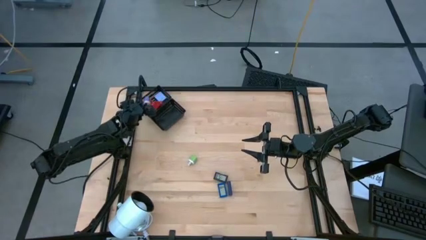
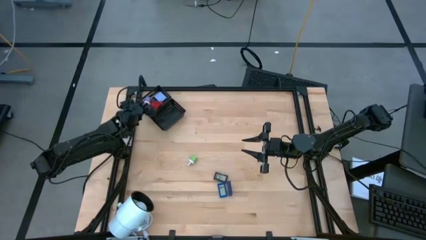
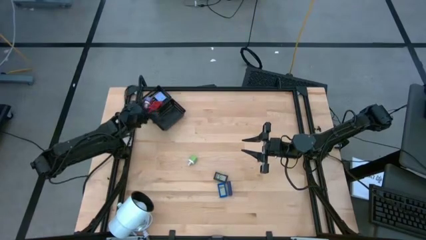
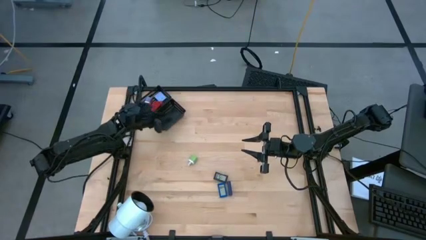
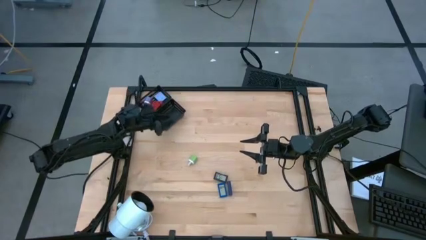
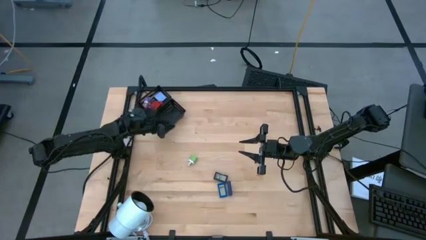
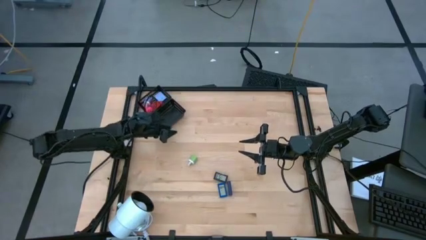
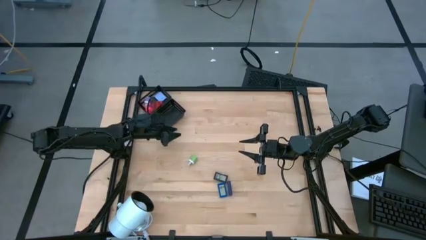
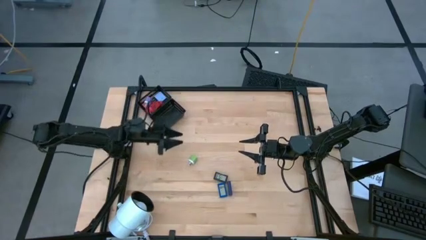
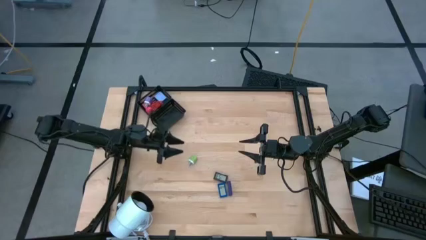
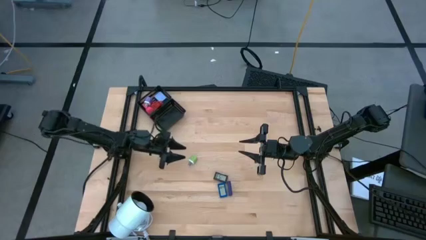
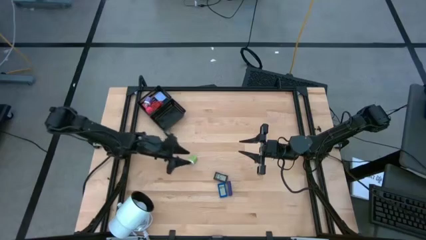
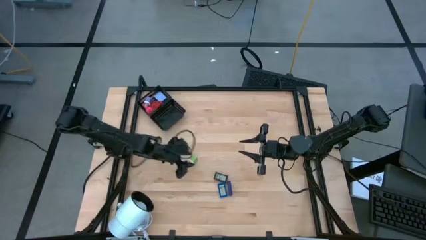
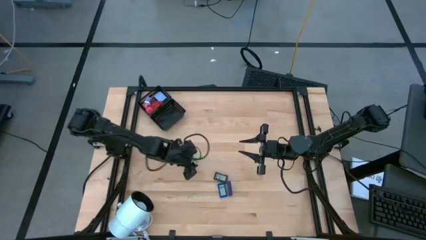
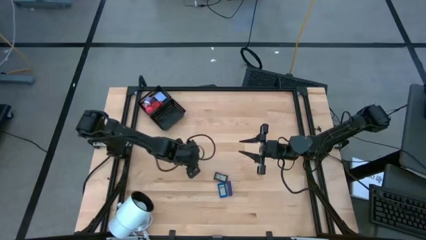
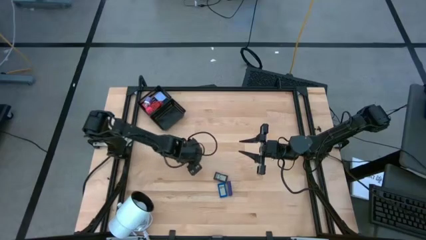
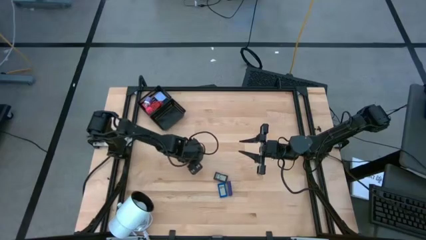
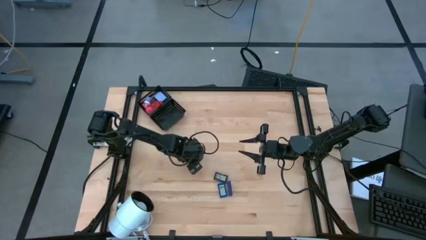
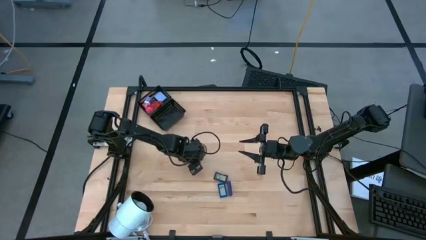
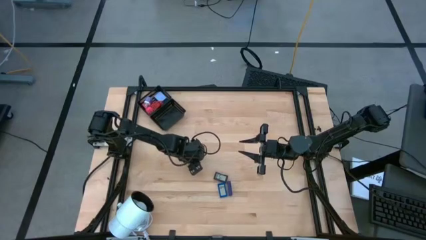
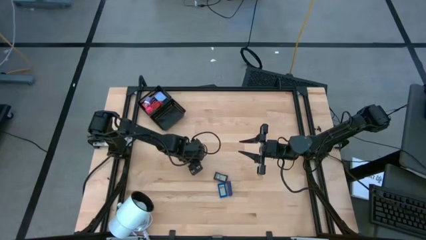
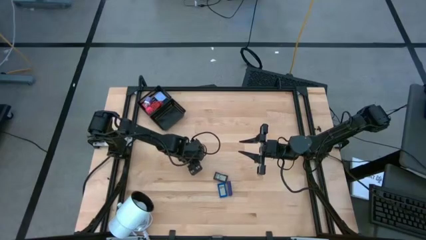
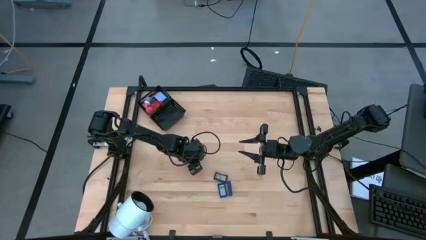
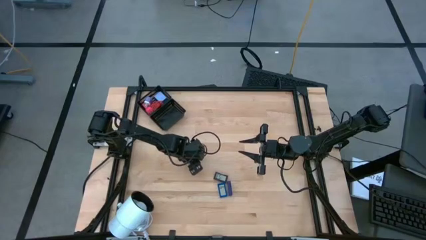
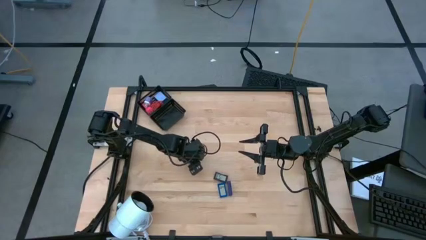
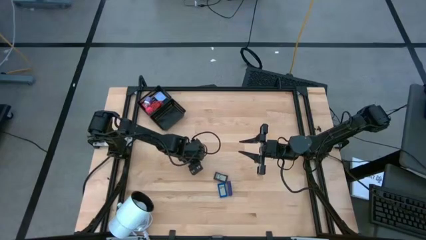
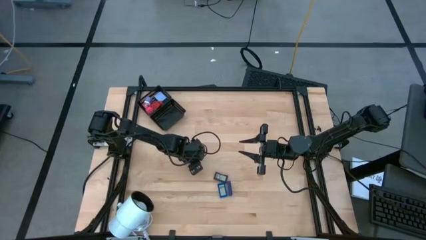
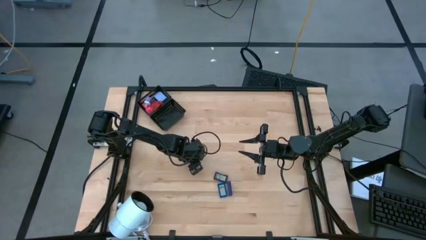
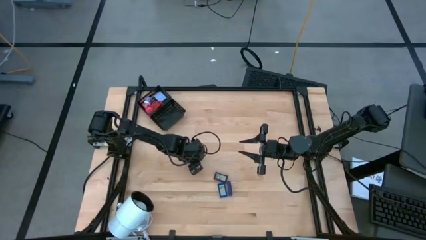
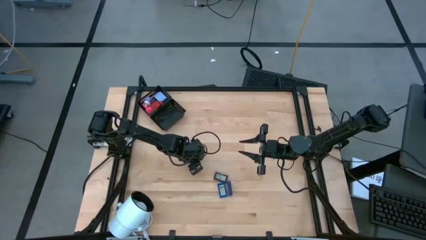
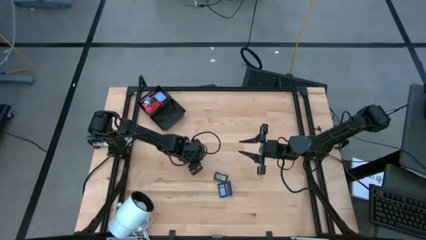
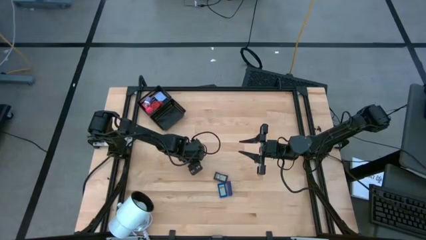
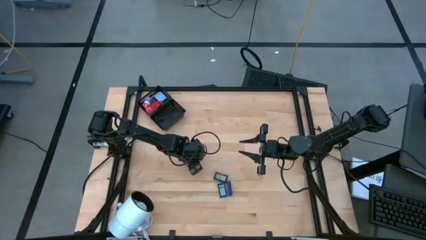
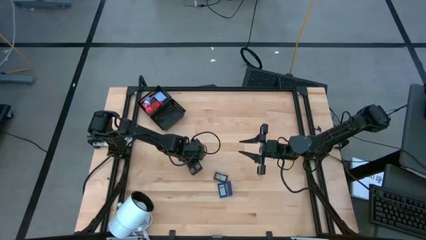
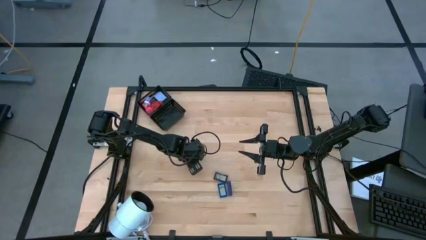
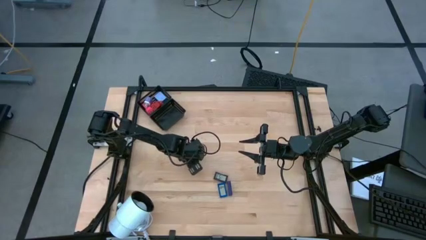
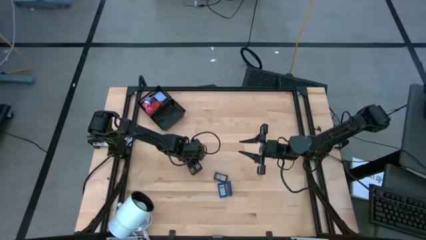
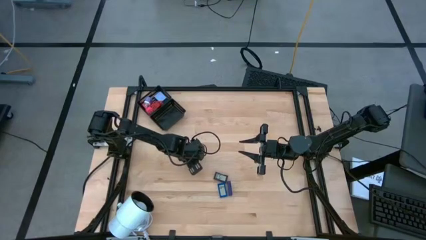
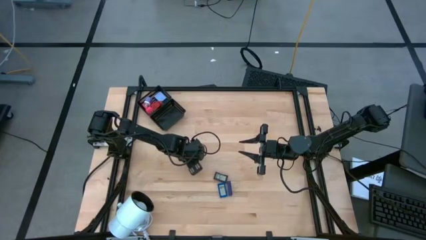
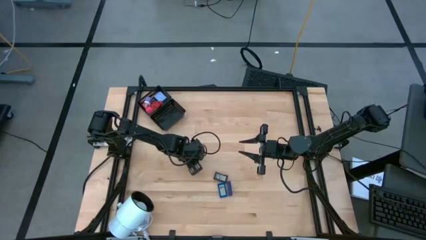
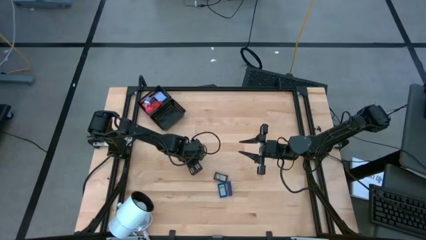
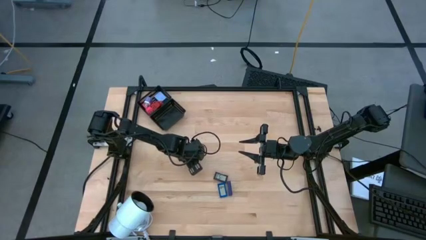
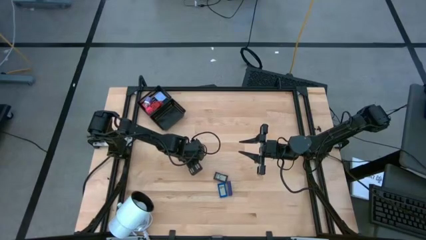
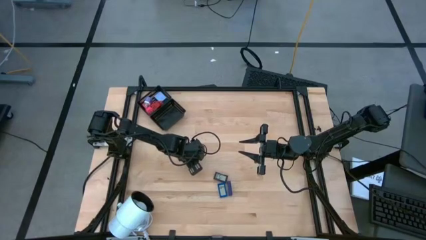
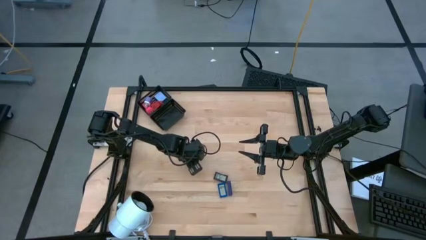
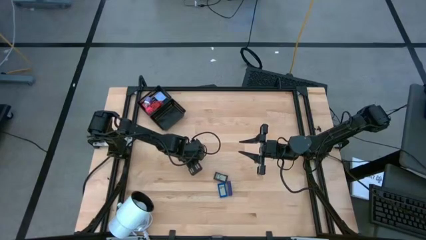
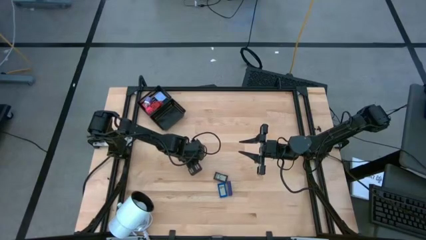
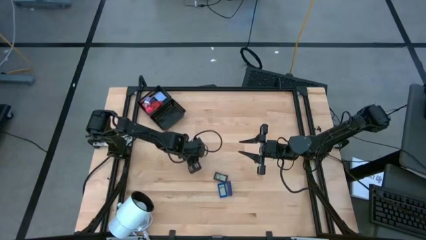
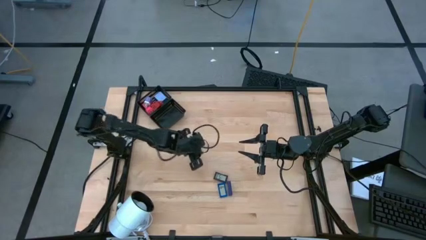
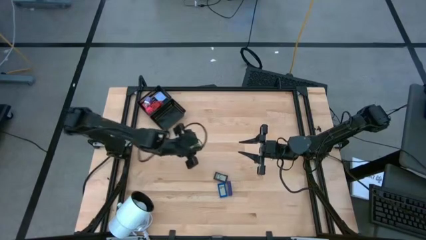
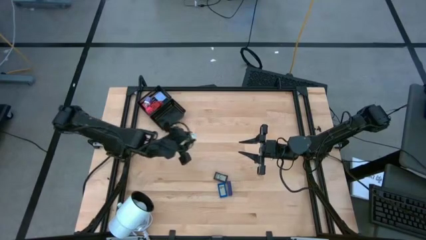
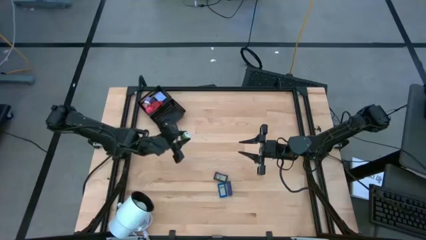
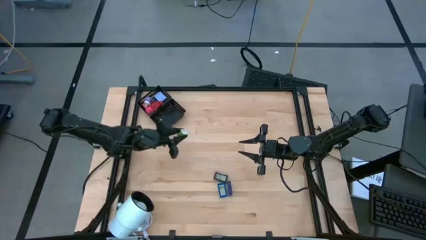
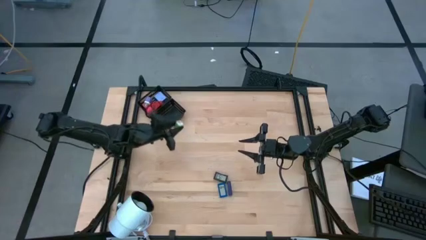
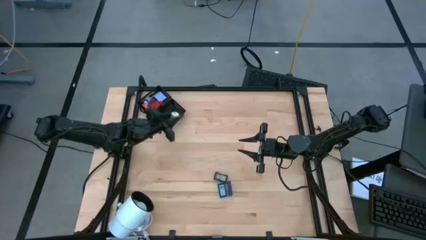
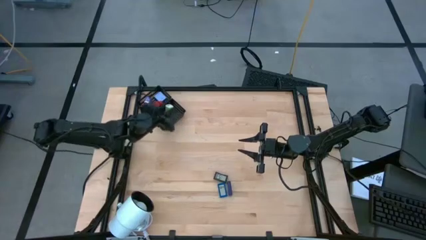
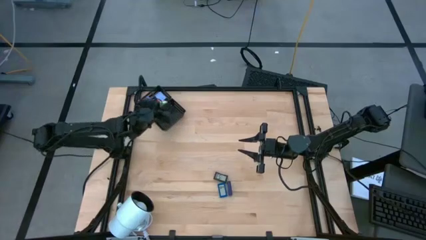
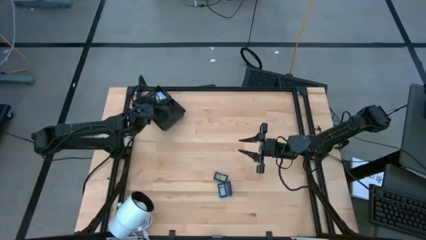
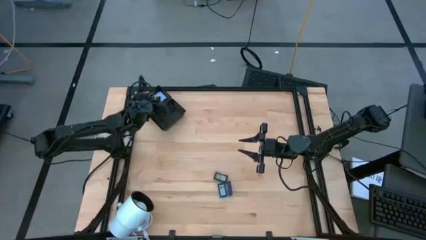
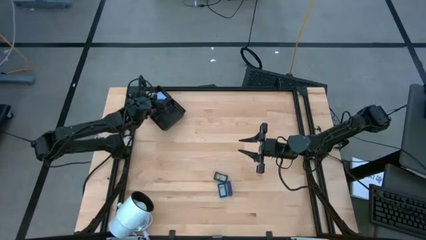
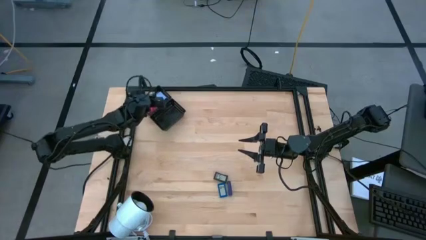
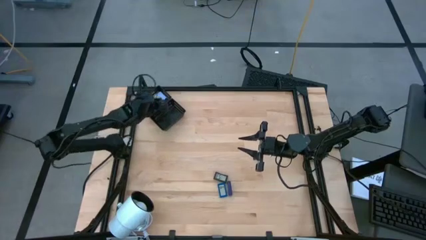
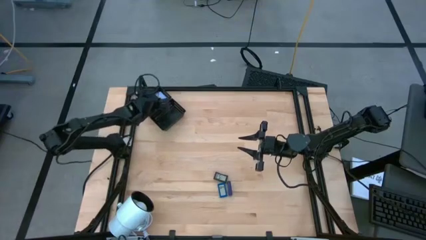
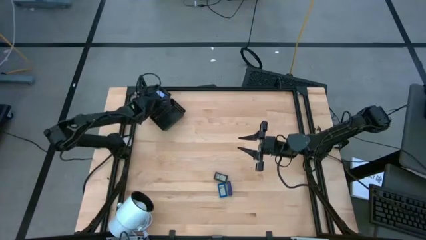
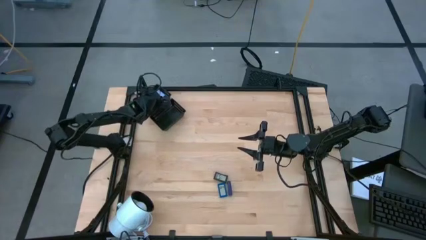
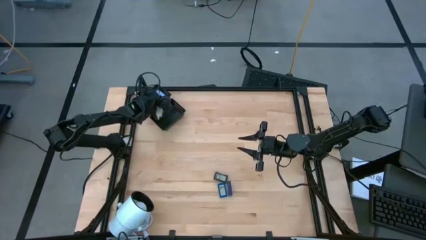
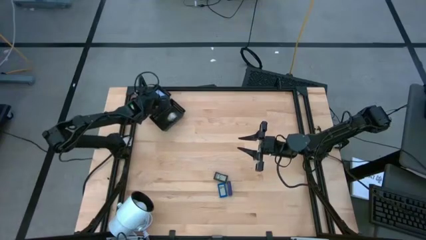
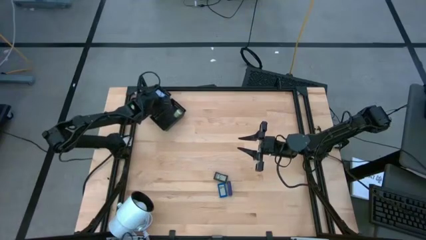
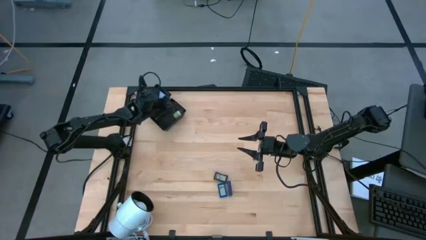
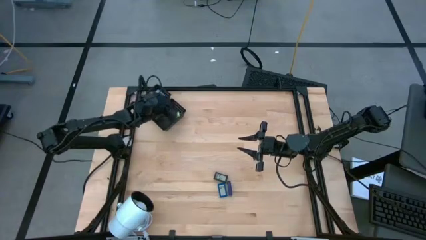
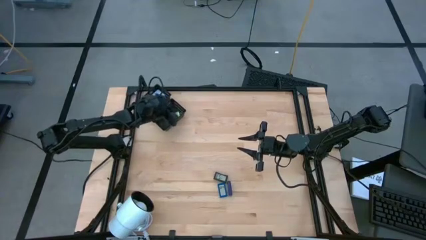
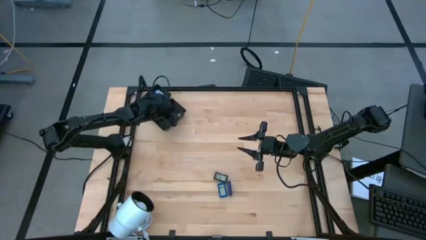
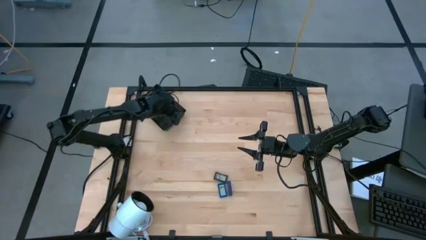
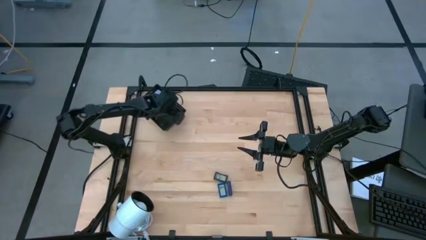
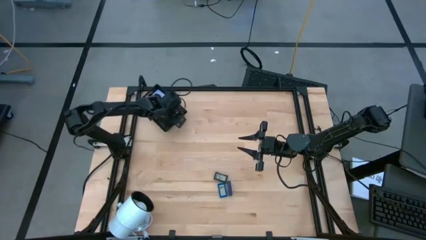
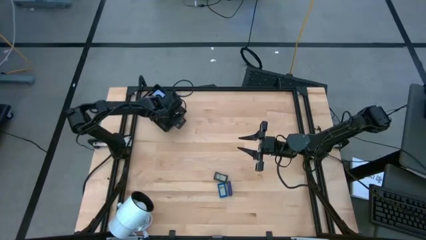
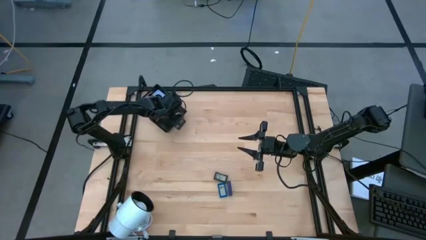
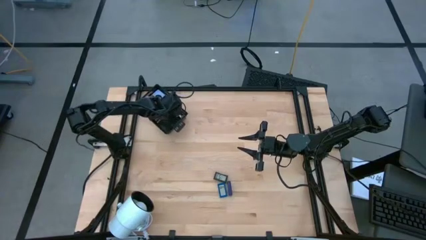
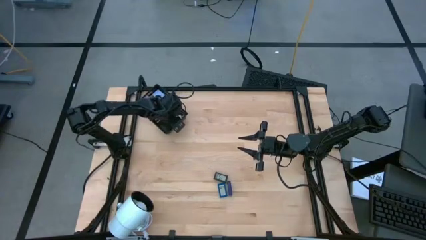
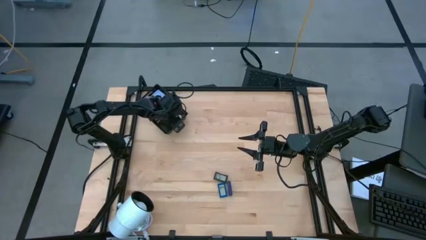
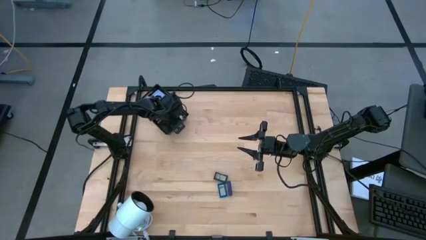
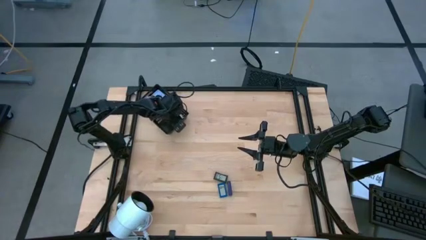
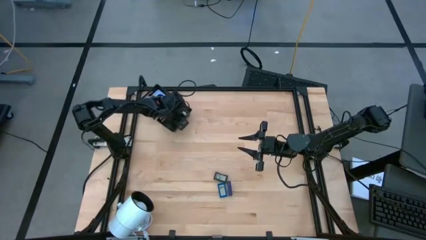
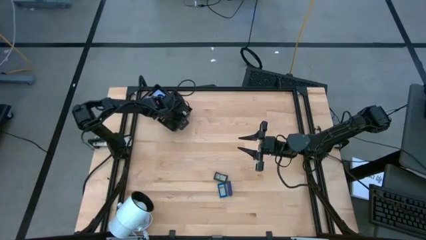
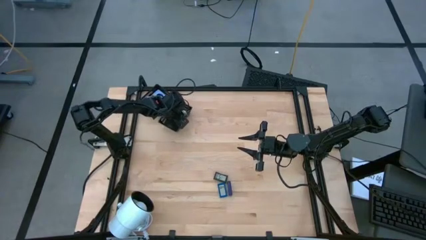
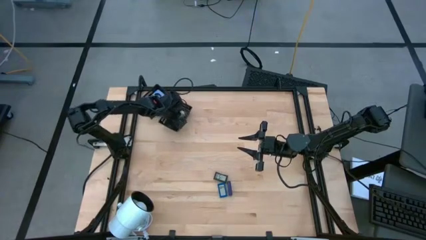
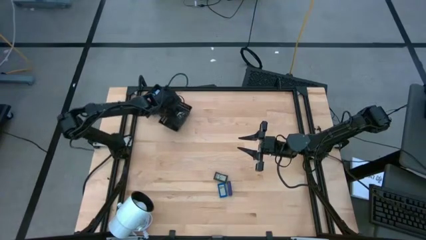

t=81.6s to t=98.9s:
Task: Pick & Place Office items
Put the green charger adapter into the top black bin
